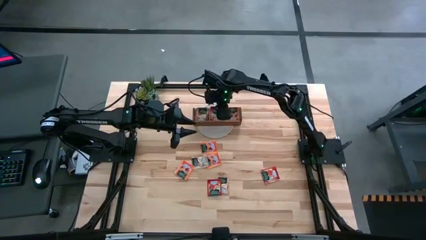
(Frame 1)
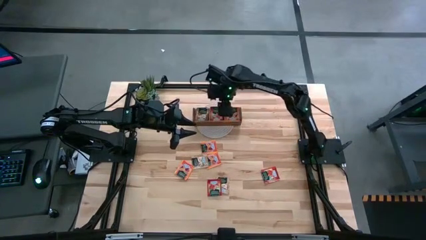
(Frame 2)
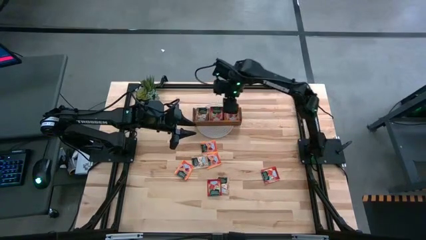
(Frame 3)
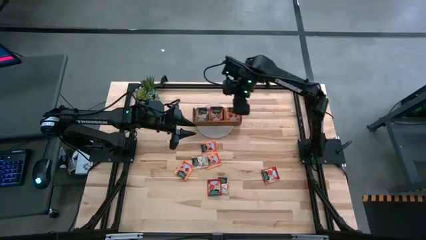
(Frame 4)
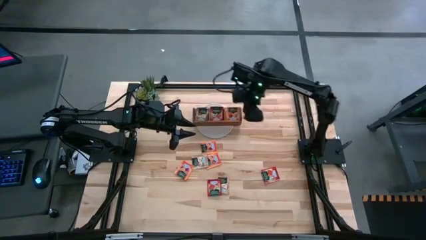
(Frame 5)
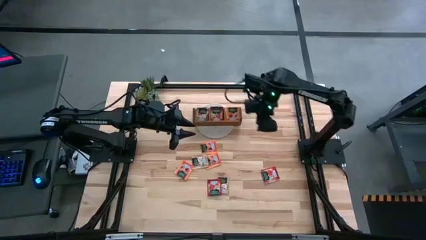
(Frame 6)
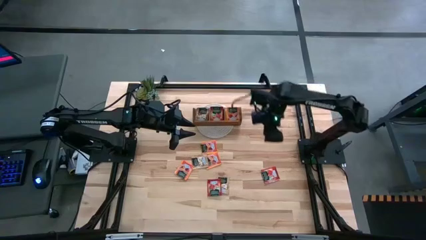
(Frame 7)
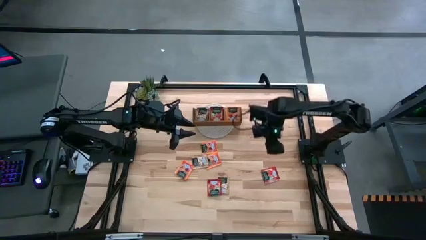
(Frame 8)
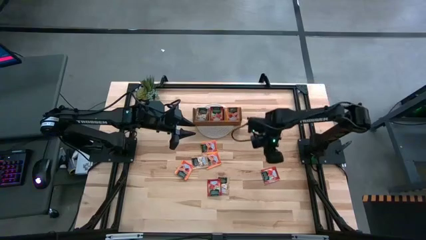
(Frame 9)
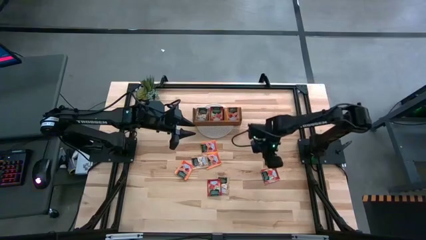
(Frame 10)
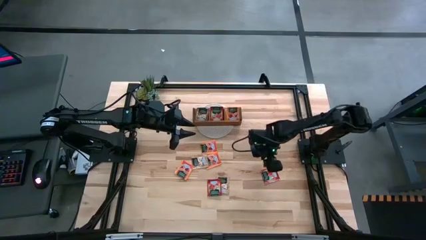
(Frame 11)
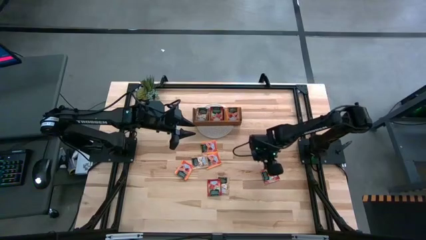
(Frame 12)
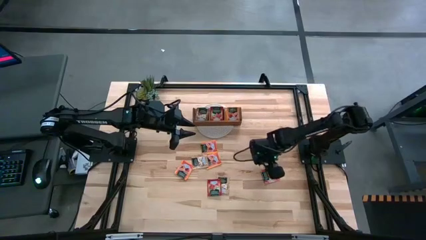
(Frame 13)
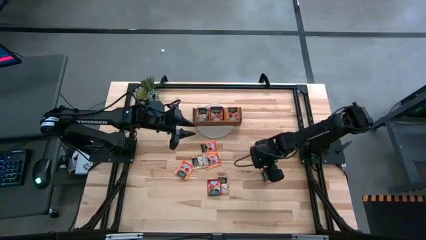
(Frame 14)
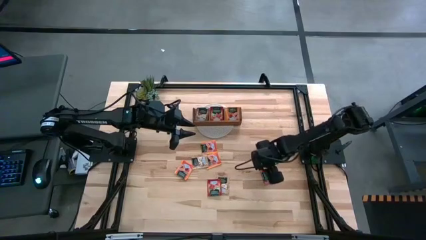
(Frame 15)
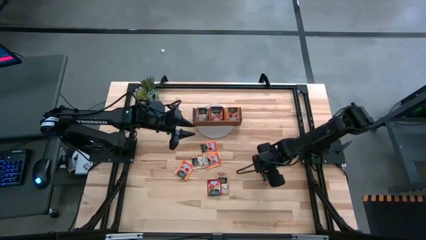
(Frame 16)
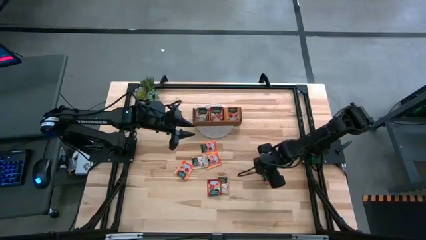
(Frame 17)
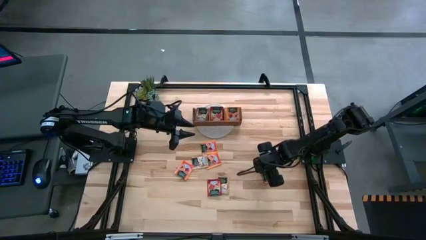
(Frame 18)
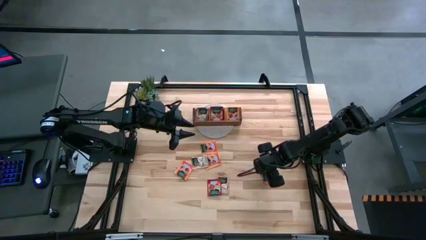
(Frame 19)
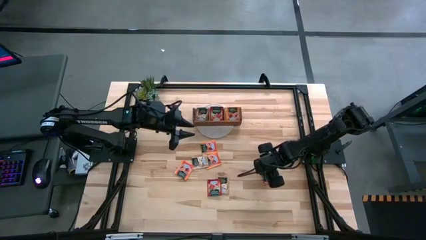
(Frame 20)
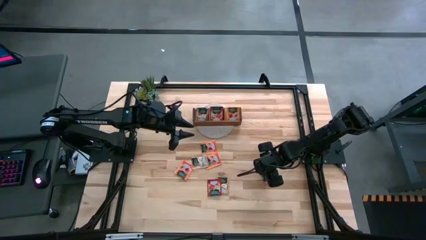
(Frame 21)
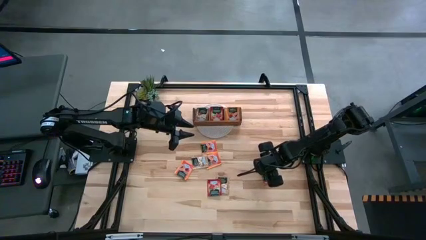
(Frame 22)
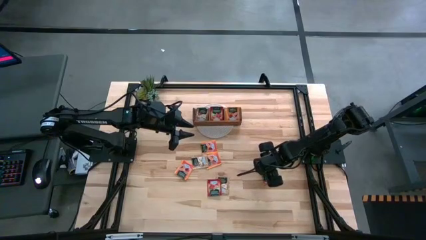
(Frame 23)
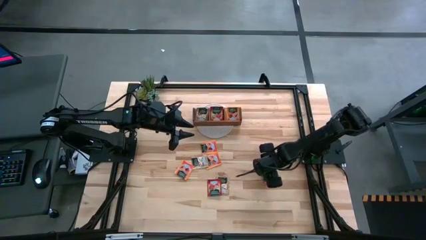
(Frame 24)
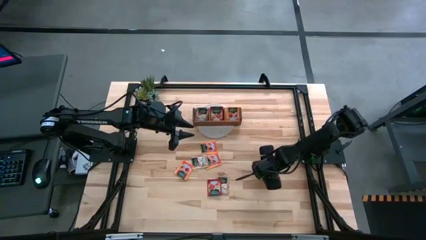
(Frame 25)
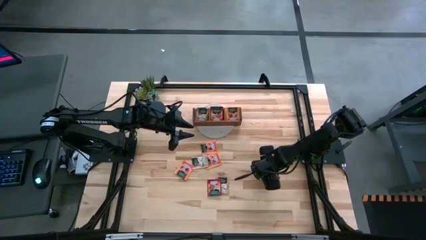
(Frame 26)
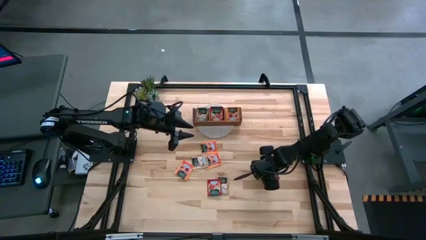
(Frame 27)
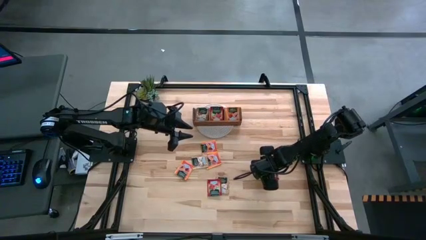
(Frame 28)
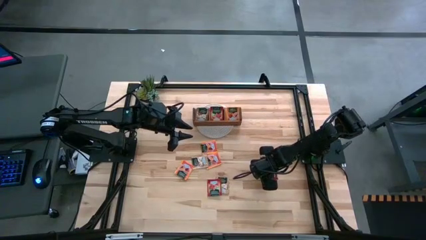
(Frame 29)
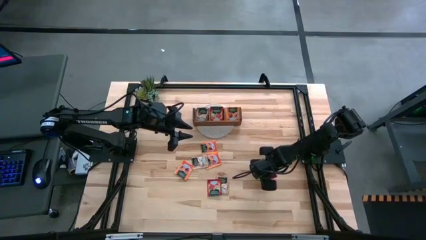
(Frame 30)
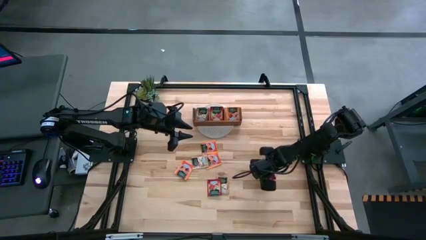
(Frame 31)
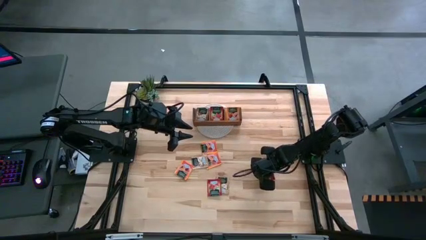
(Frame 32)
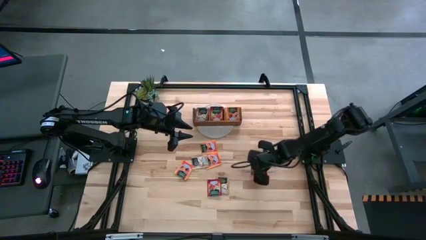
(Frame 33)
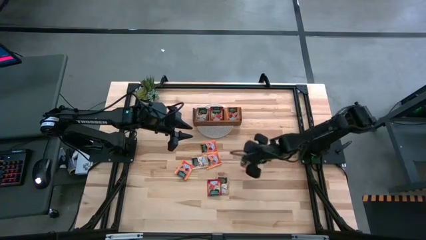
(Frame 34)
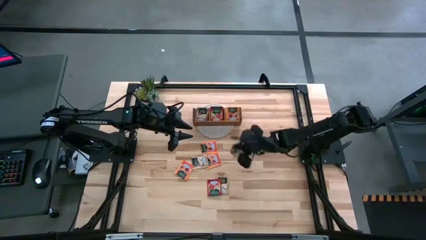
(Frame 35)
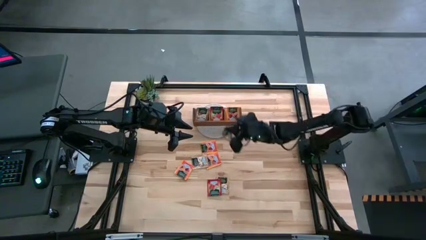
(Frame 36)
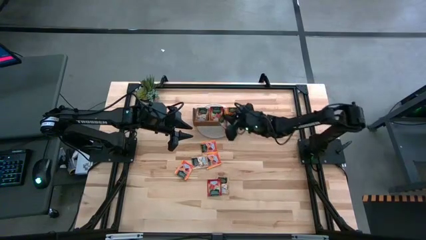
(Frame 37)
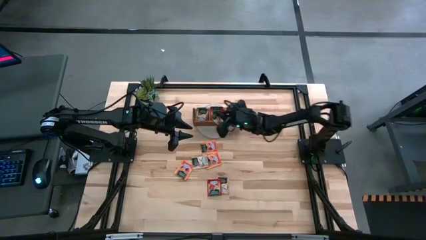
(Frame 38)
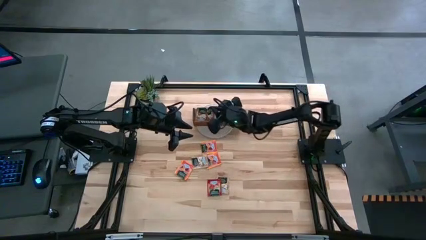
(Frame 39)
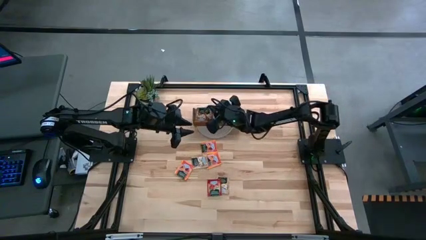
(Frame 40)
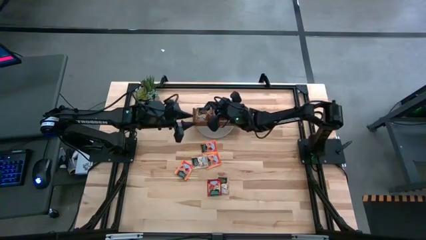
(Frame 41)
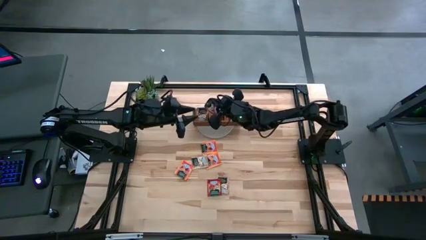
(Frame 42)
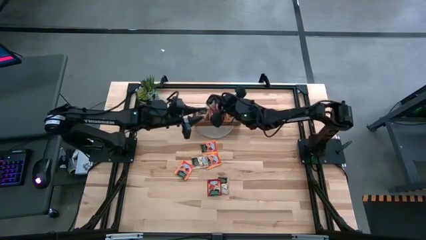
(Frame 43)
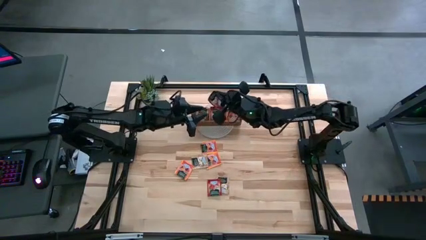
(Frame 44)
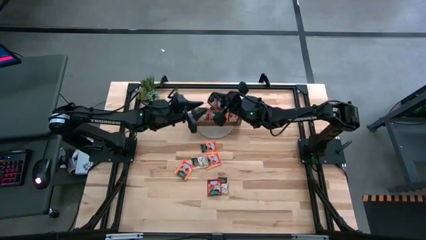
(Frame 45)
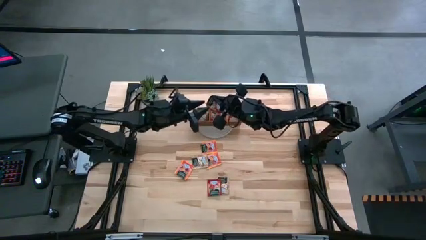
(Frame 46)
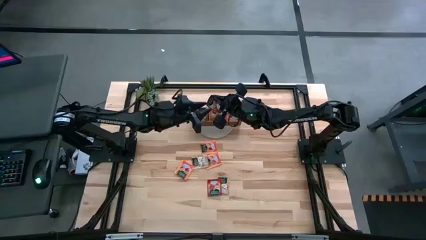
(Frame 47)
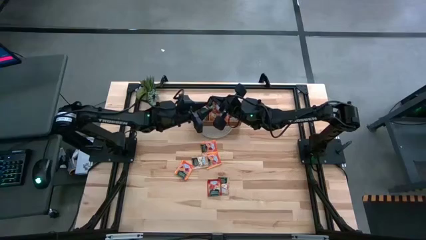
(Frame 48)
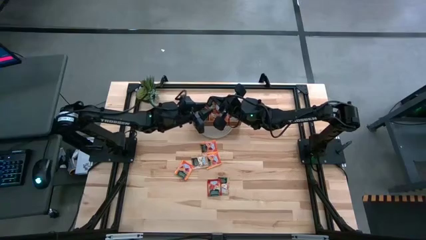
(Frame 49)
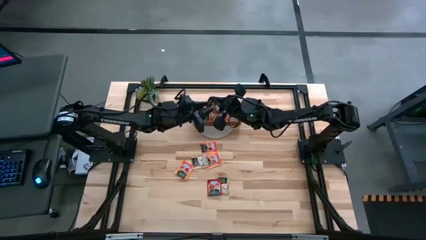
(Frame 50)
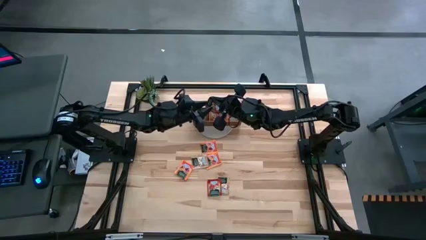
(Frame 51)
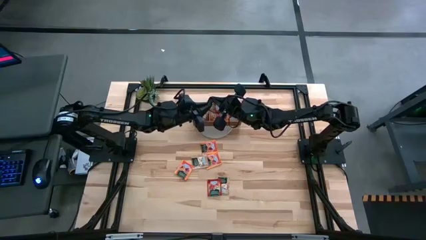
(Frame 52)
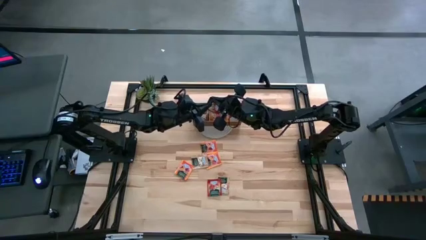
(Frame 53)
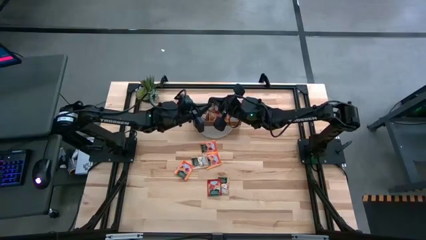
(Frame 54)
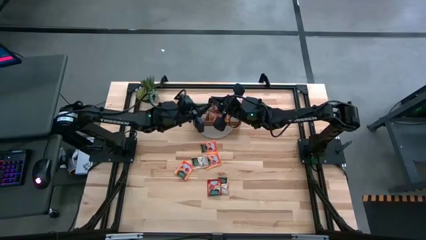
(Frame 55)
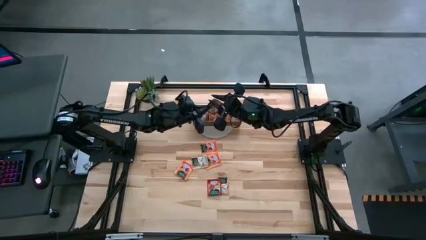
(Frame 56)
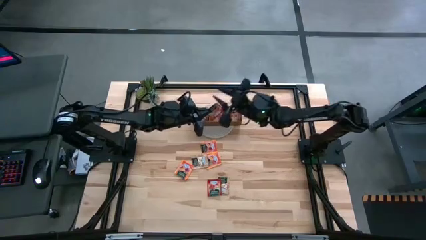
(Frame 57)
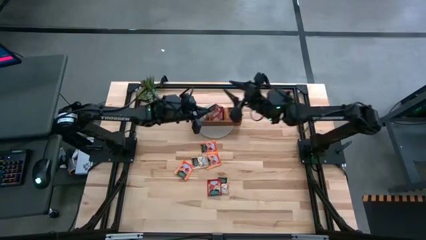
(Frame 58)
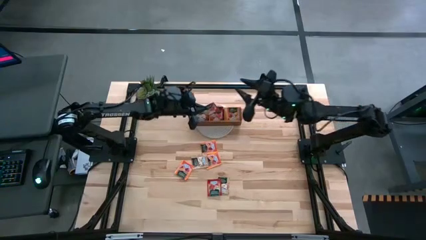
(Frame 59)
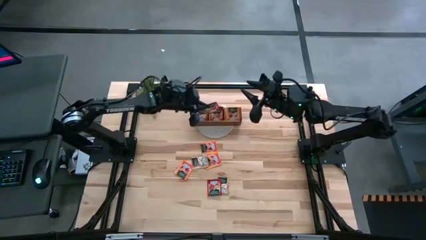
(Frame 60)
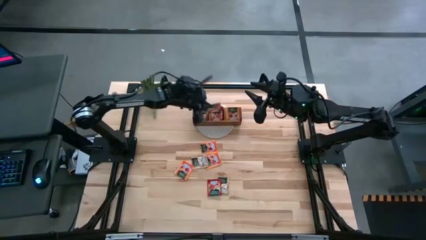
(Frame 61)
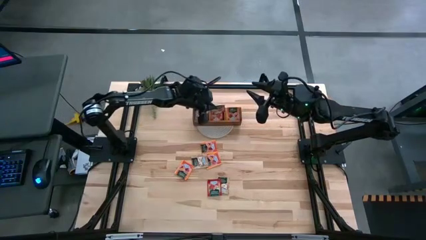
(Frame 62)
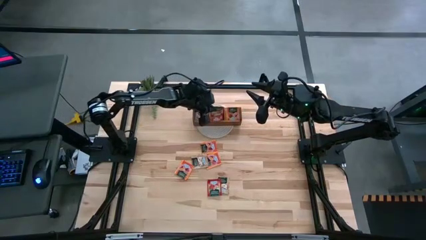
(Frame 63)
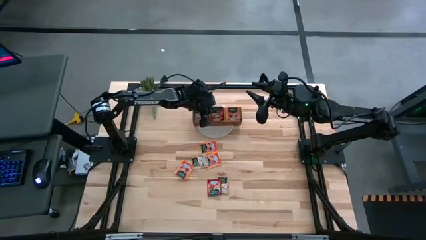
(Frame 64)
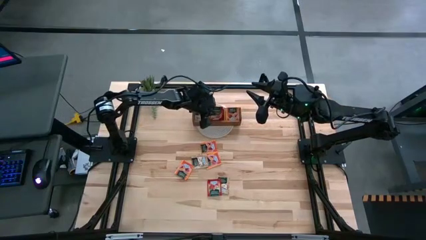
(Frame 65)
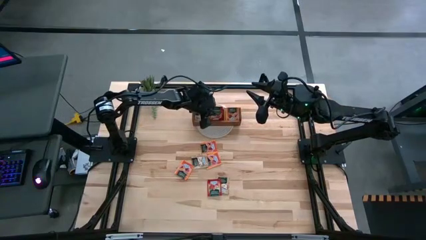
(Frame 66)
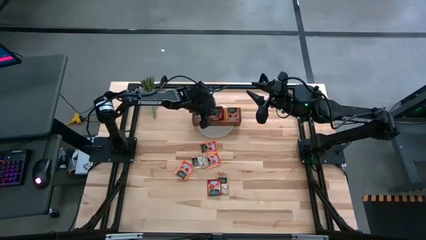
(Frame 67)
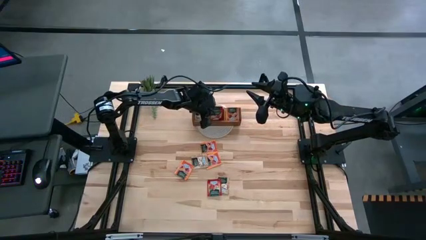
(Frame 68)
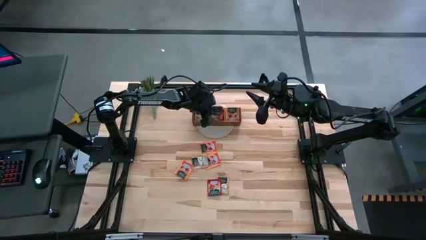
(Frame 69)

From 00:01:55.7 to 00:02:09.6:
Task: Pick & Place Tea
Put the red tea bag in the middle section of the wooden organizer

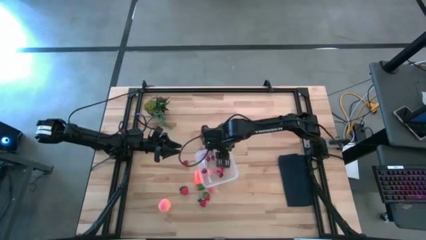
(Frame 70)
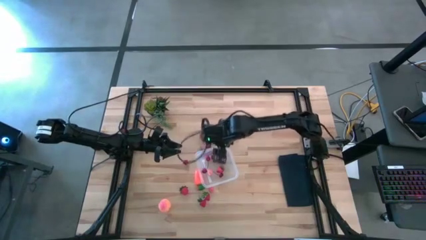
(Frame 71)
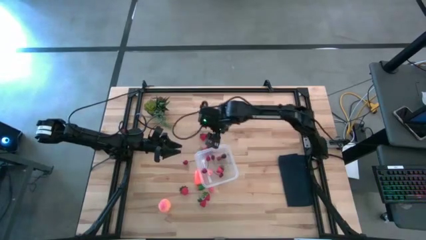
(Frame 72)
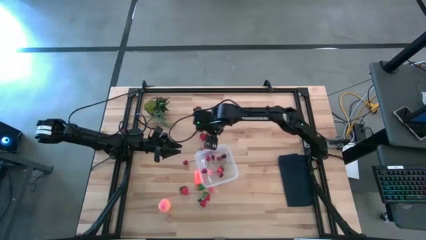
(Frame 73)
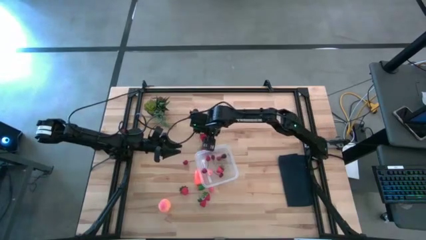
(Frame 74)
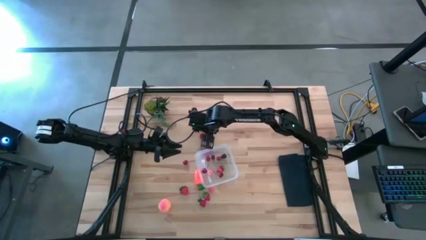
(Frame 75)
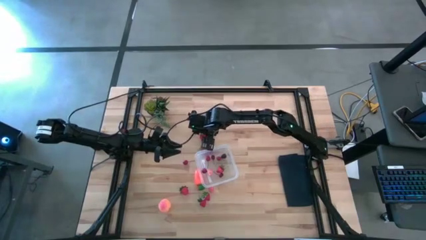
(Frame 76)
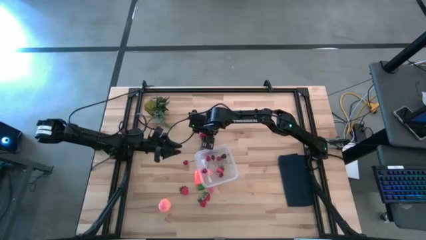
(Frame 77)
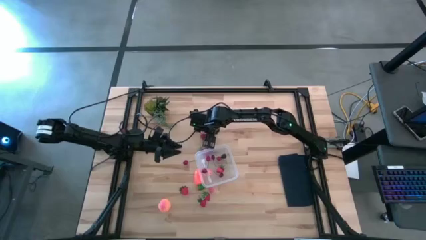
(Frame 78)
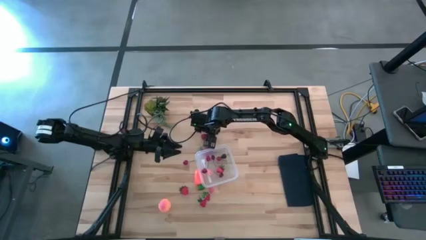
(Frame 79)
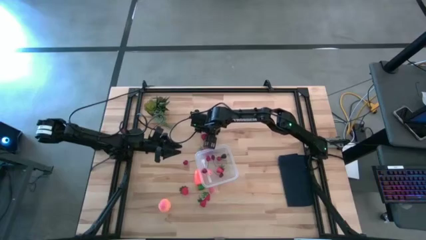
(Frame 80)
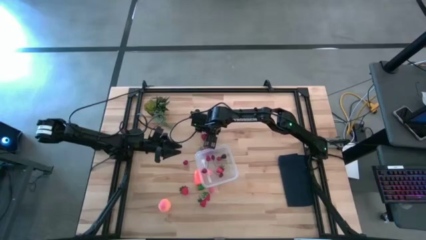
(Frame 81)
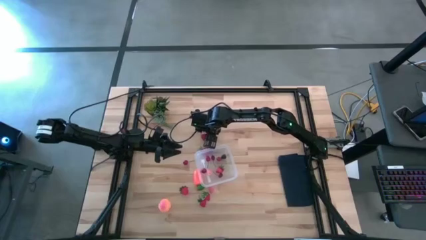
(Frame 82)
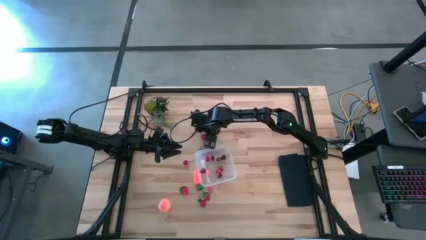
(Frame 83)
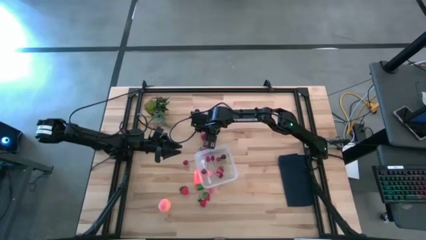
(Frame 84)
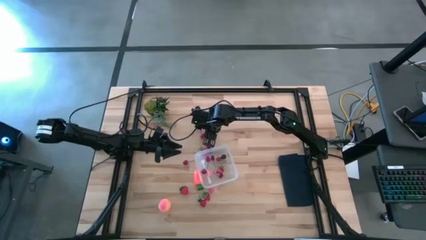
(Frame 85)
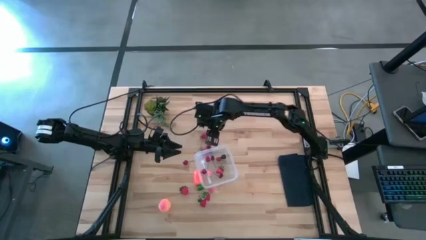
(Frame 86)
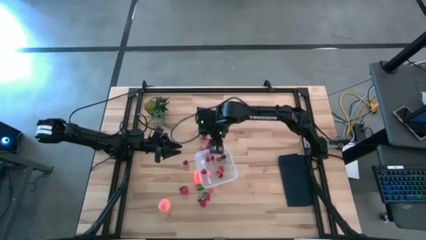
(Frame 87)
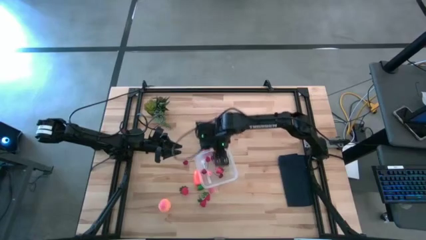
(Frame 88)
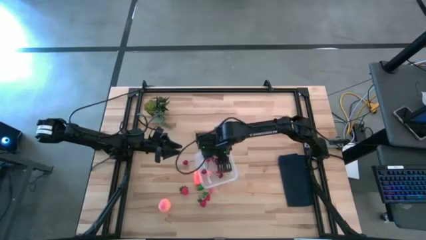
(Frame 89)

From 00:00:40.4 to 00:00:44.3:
Task: Pick and placing Produce into tupperware
Put the strawberry into the transparent container
